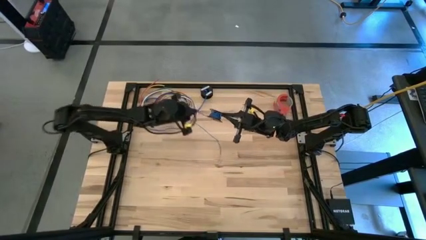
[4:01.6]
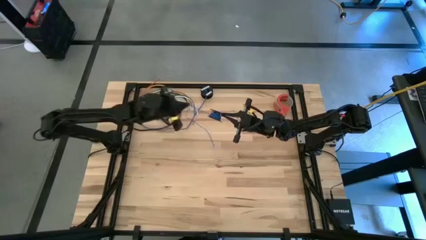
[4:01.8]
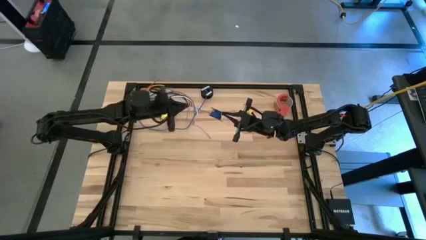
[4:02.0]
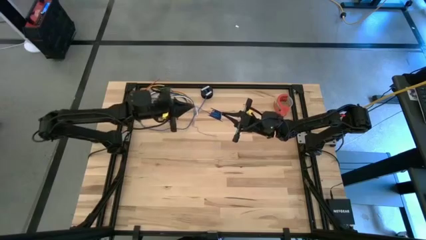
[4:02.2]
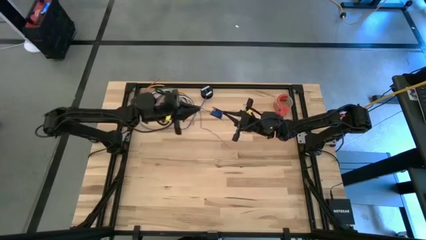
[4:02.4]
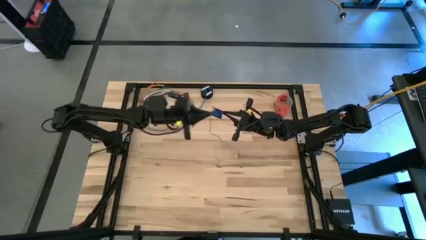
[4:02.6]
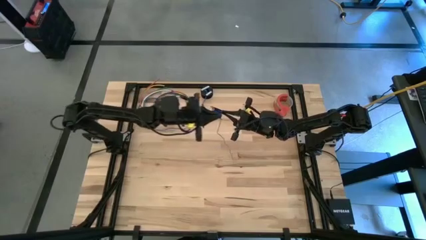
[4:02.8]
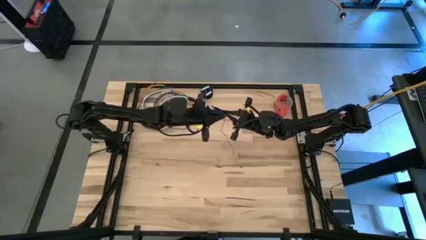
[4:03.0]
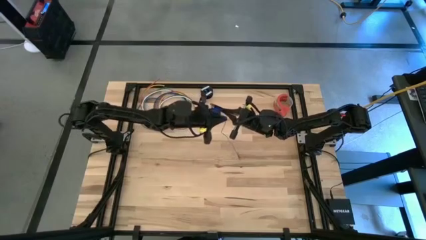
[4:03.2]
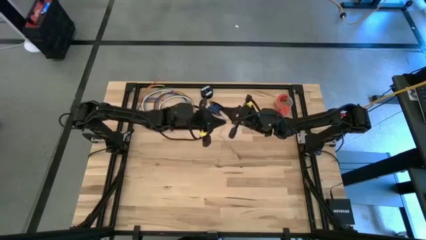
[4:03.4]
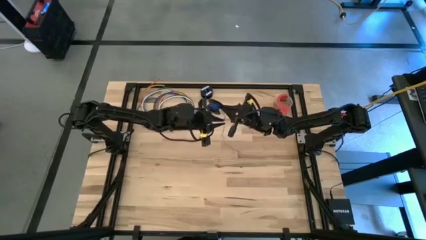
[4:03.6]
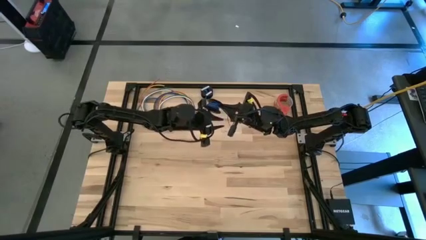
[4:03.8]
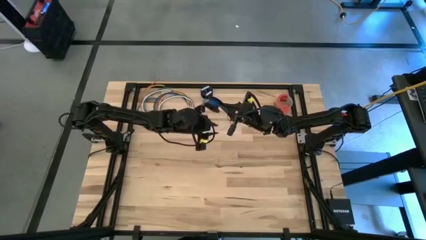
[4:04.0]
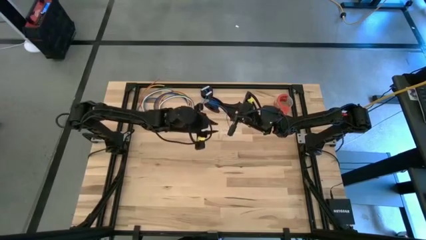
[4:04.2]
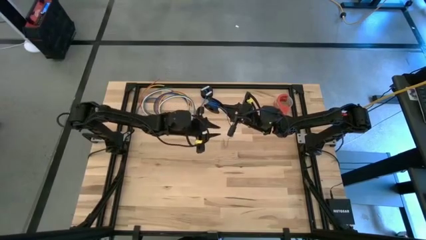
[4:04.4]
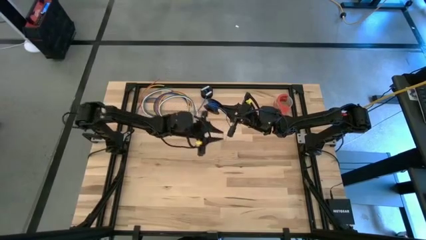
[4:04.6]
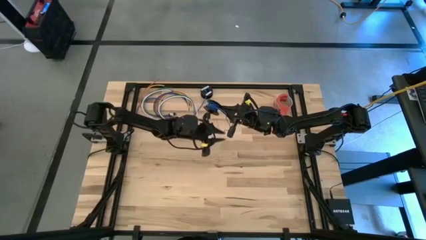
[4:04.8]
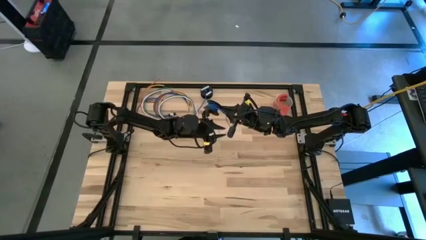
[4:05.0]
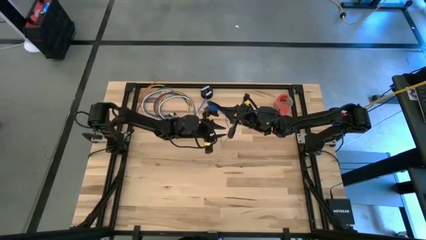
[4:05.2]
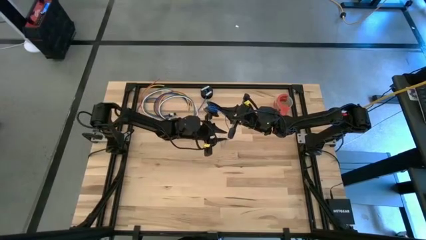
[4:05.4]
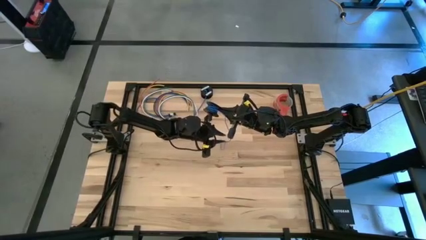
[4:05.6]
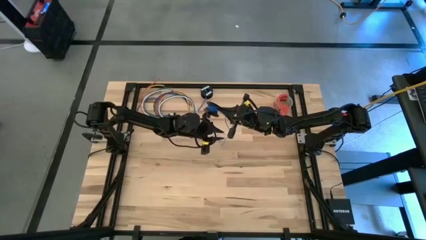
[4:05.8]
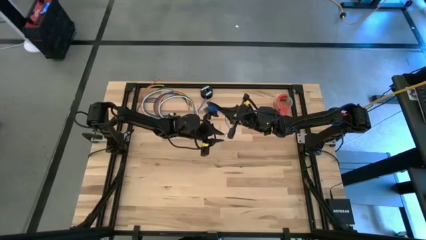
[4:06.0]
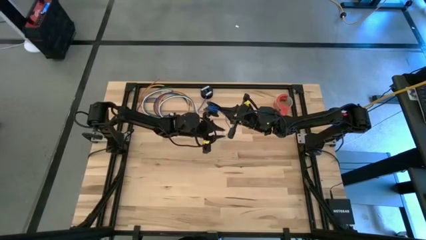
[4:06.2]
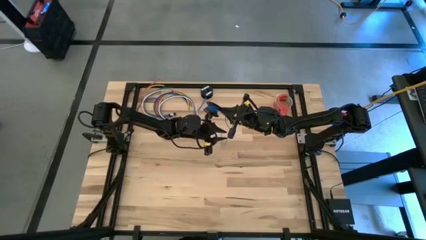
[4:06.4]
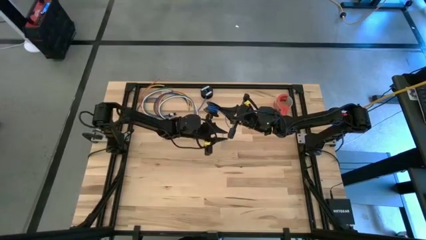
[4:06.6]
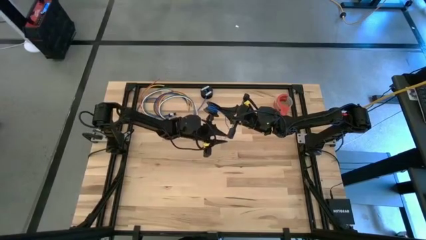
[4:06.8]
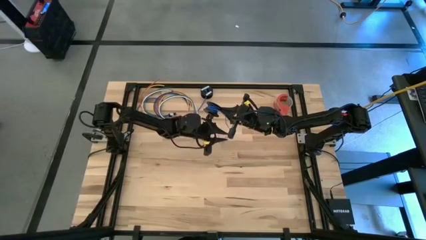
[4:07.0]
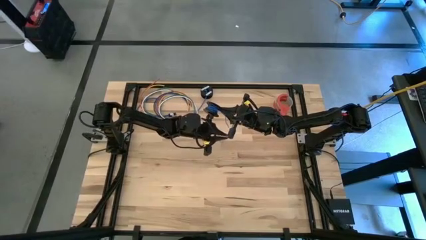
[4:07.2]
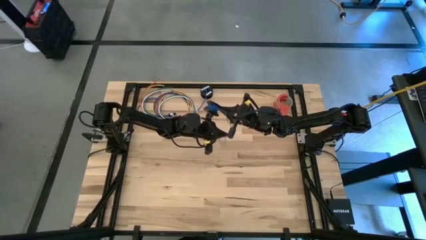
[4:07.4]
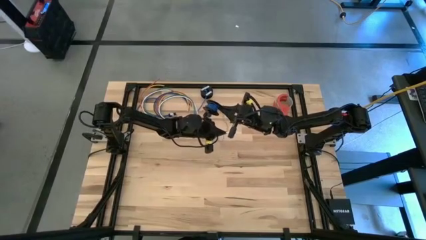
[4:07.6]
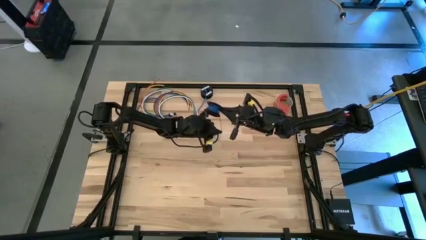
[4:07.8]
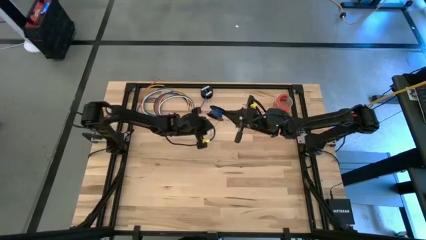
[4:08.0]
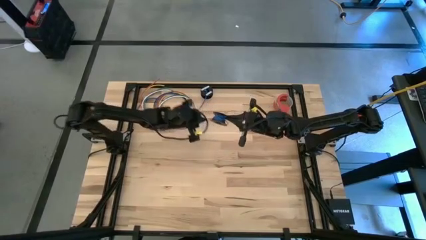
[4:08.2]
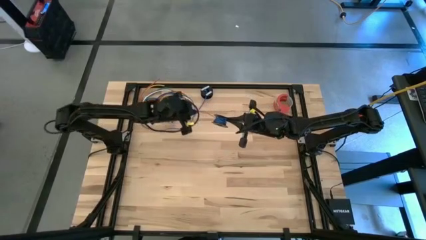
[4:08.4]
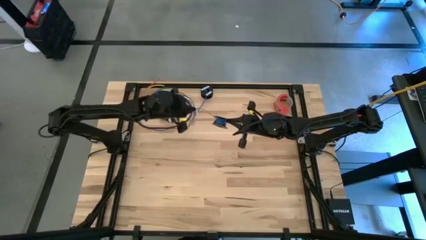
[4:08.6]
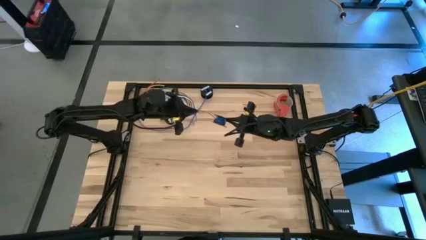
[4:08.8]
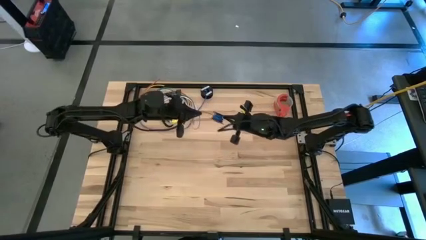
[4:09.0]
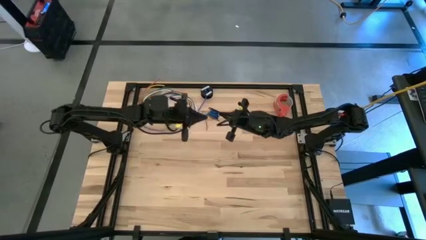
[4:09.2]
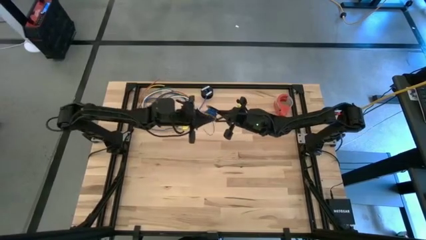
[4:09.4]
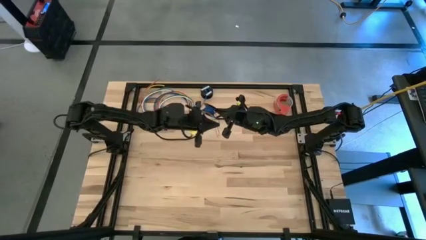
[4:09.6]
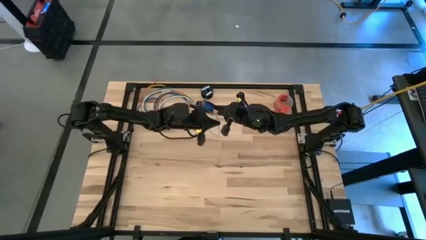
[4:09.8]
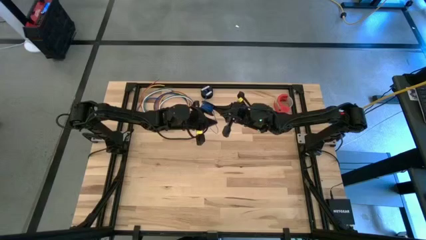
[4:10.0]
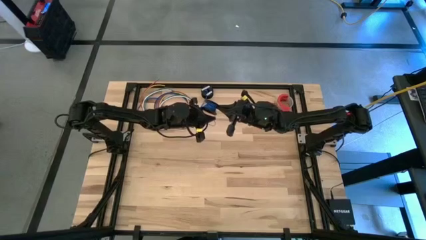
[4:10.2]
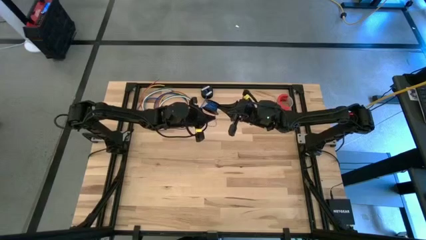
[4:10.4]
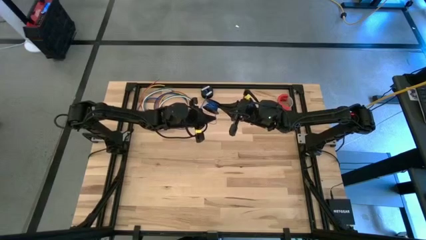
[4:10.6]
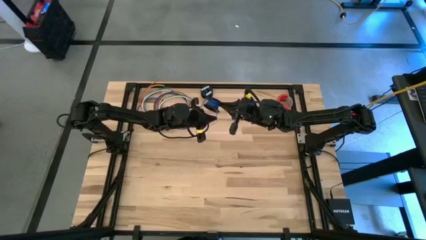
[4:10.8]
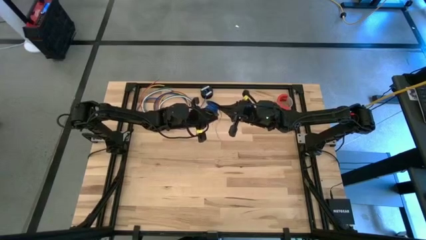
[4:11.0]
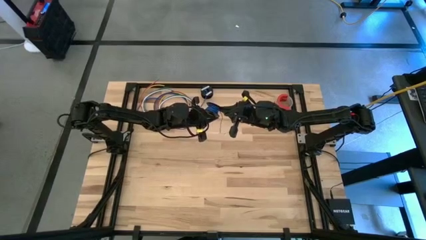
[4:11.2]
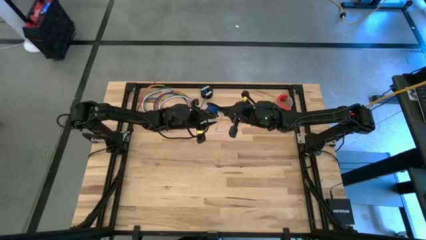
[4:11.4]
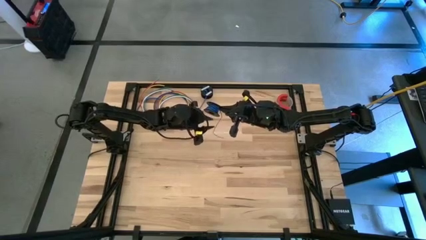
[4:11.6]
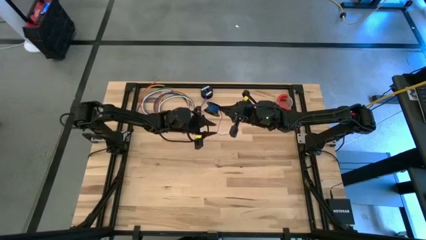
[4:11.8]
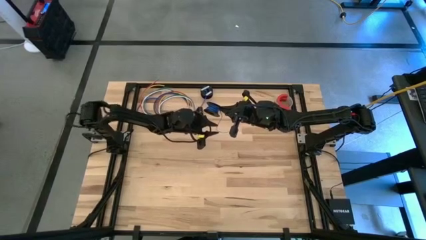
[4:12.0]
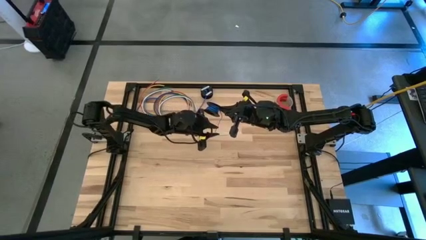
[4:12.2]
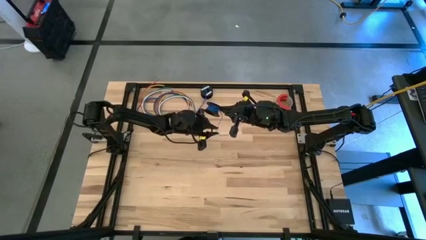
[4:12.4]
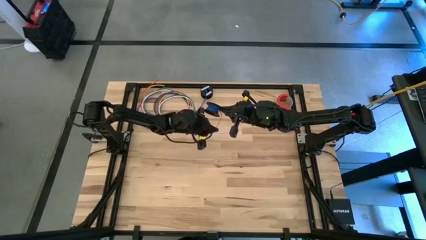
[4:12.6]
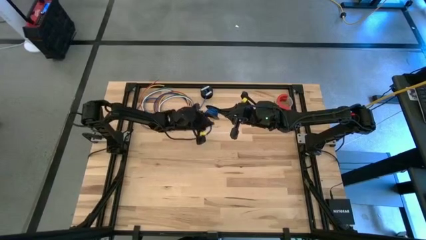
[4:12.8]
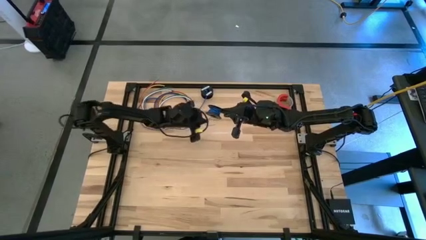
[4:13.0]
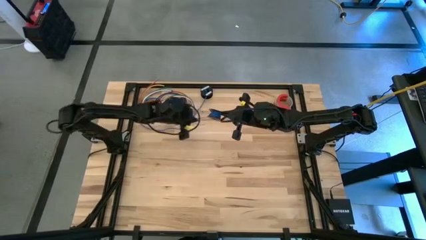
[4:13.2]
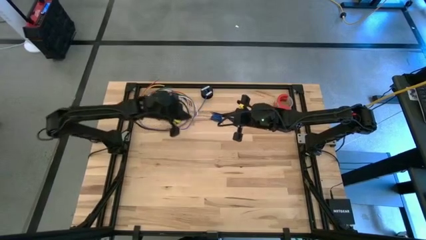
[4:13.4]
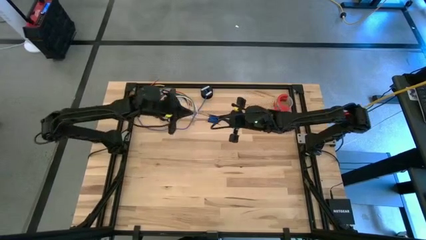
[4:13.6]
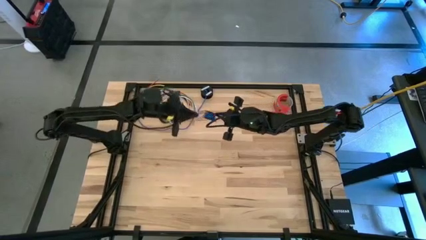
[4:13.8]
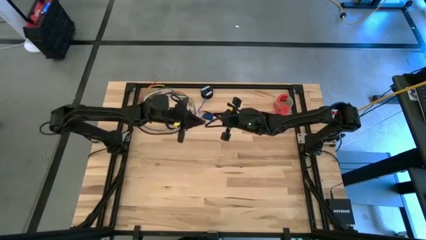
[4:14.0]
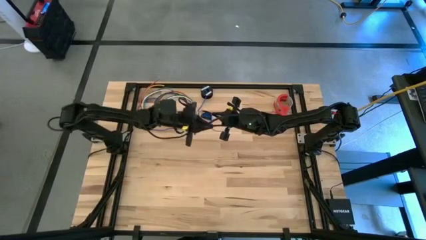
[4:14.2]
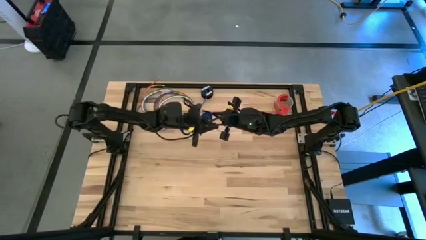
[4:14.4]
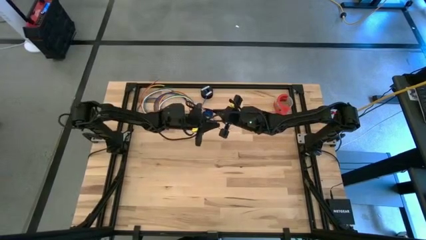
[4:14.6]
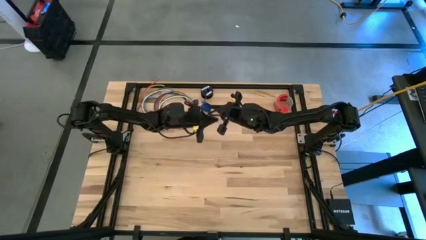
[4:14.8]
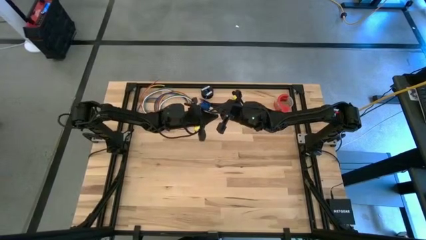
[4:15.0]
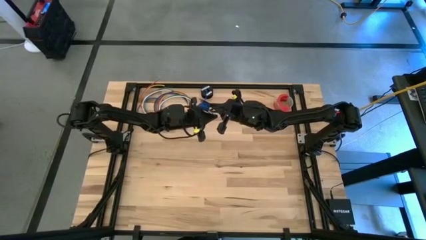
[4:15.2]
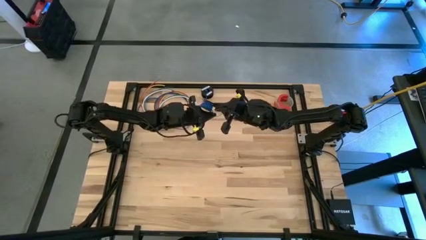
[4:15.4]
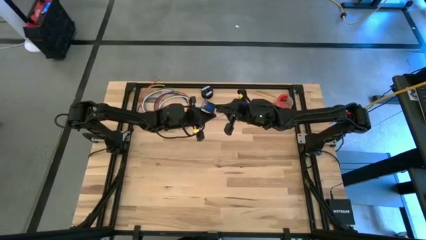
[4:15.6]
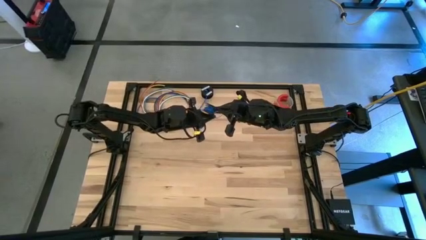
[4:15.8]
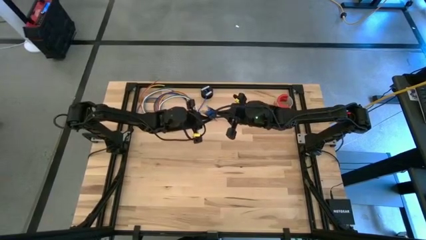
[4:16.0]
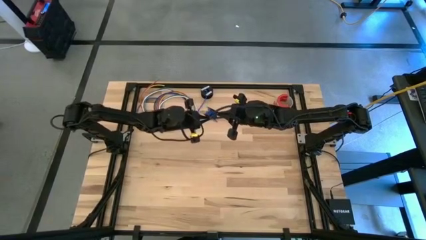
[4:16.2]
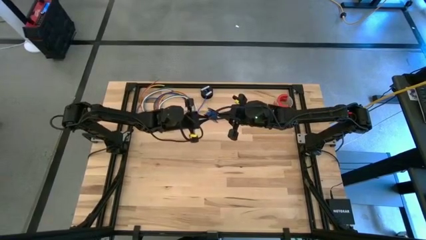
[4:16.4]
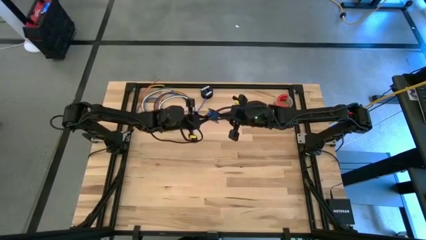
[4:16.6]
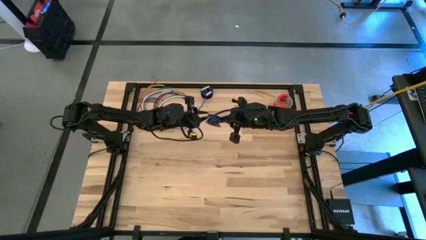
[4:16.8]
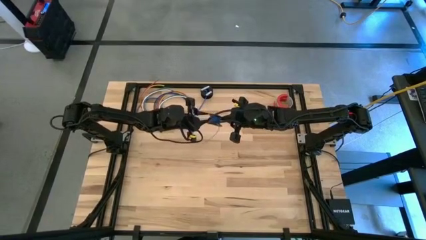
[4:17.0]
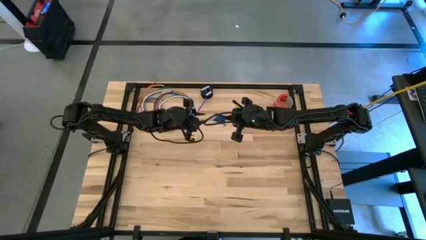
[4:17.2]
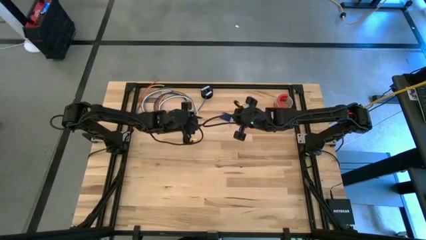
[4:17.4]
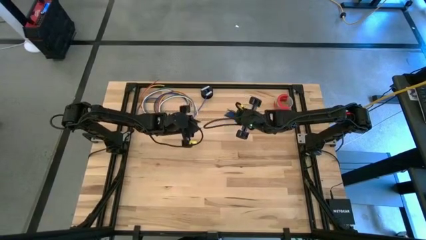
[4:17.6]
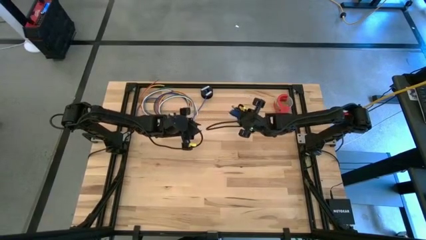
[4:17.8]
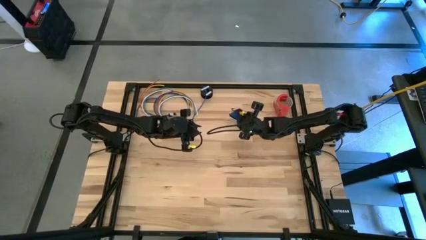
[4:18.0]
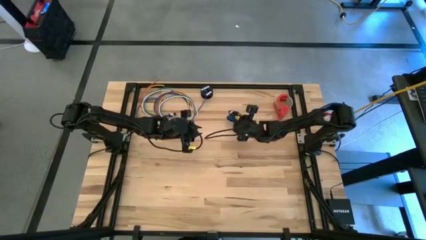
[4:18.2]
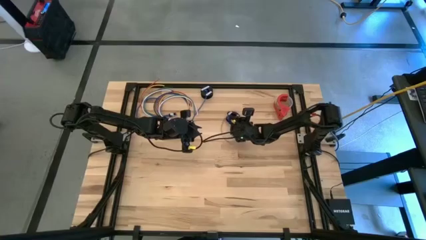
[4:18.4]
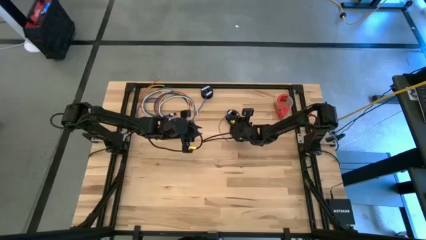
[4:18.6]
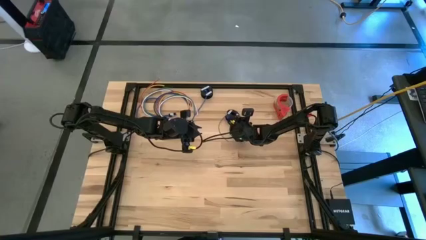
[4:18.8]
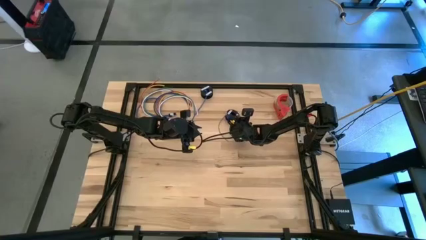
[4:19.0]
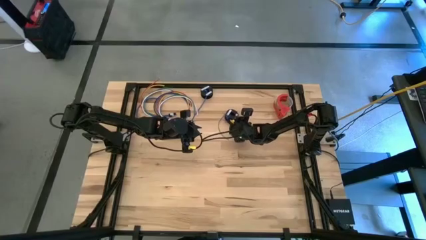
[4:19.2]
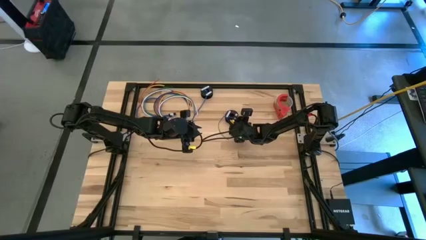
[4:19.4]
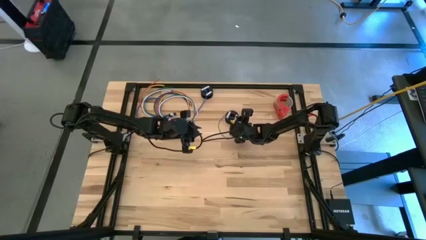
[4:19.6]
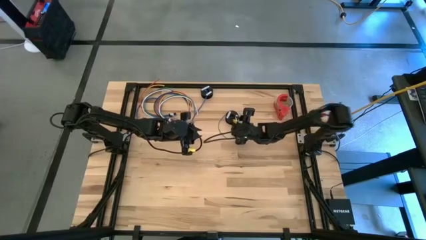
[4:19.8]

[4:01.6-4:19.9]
Task: Coil cords
Coil the blue wire onto the black spool
